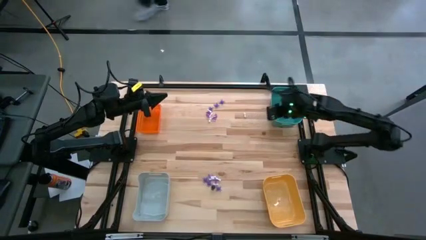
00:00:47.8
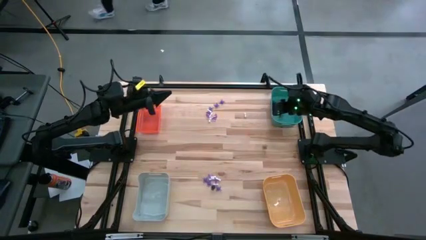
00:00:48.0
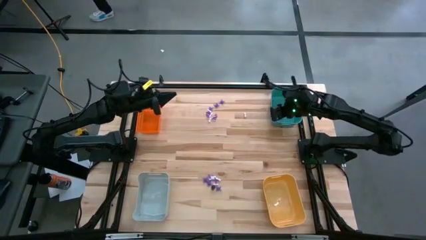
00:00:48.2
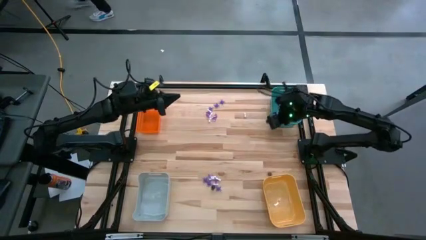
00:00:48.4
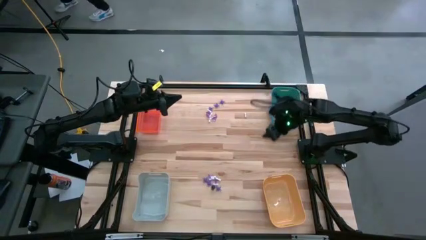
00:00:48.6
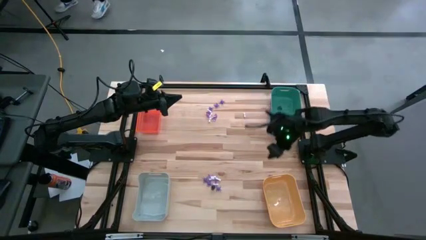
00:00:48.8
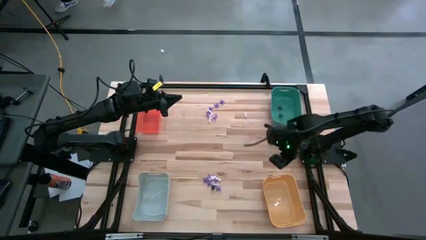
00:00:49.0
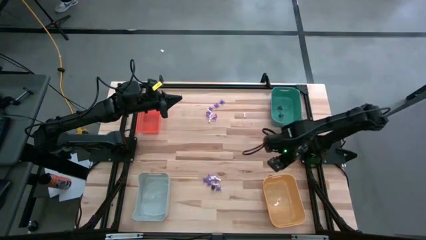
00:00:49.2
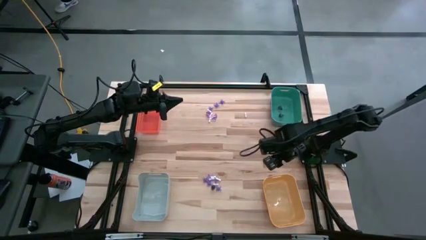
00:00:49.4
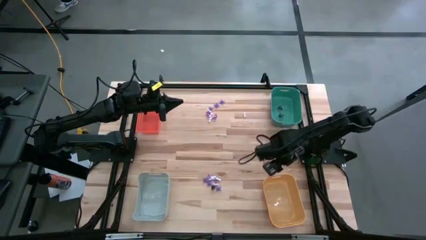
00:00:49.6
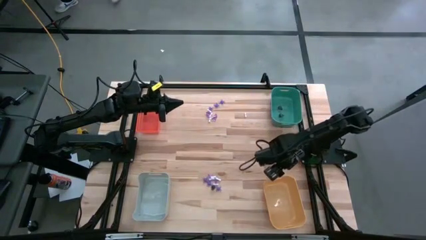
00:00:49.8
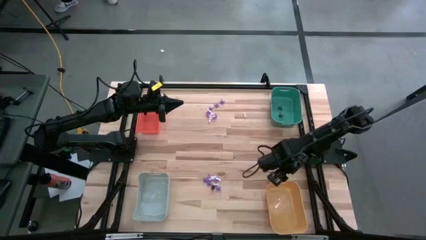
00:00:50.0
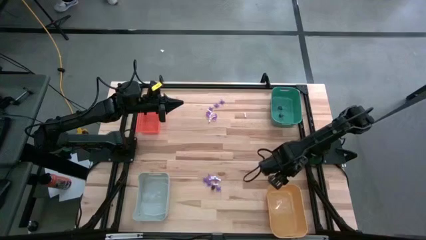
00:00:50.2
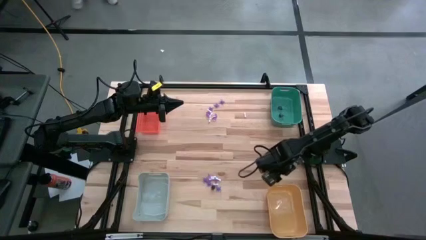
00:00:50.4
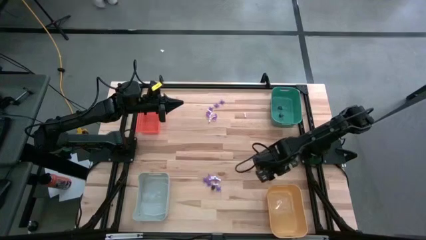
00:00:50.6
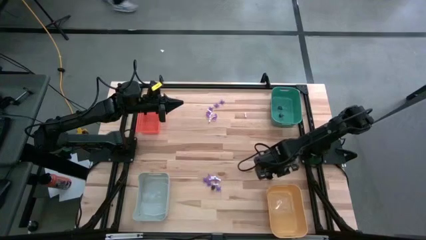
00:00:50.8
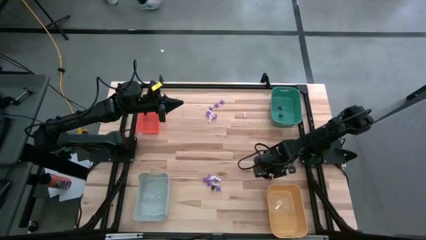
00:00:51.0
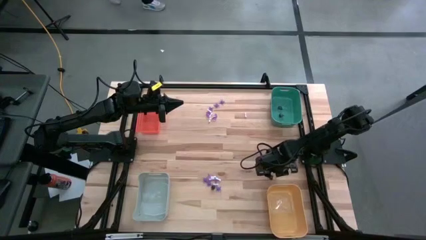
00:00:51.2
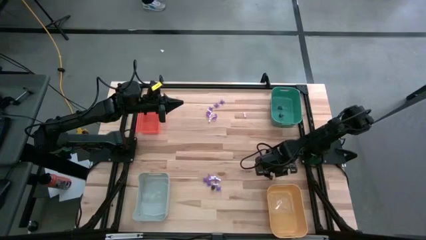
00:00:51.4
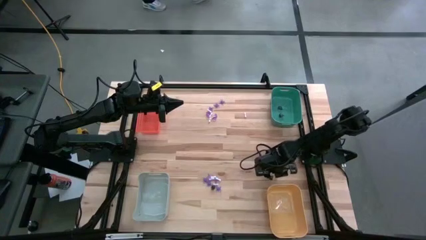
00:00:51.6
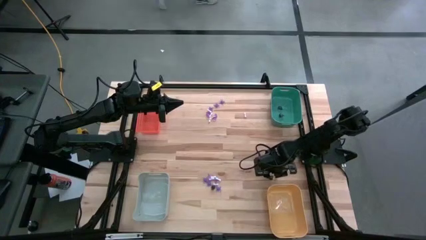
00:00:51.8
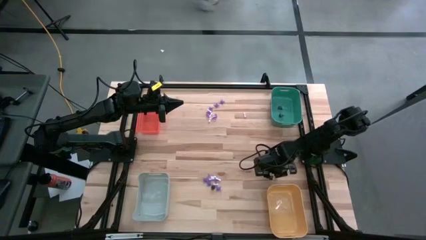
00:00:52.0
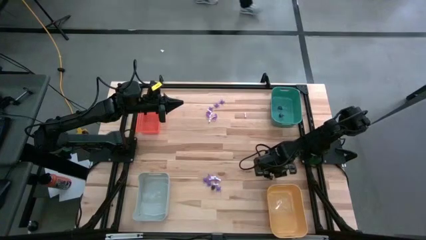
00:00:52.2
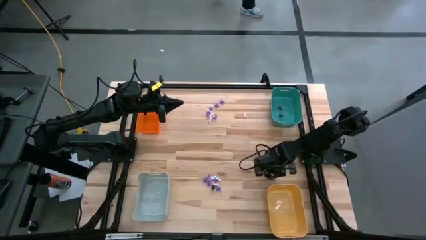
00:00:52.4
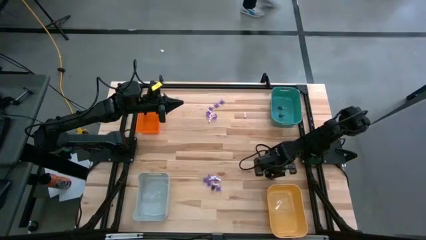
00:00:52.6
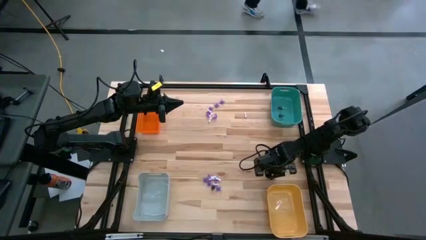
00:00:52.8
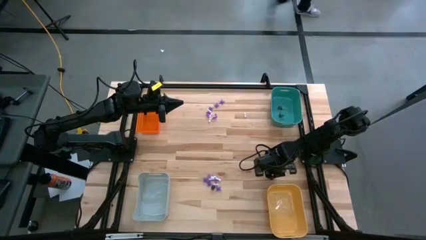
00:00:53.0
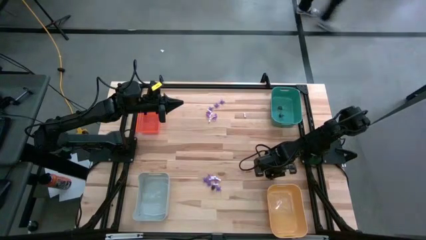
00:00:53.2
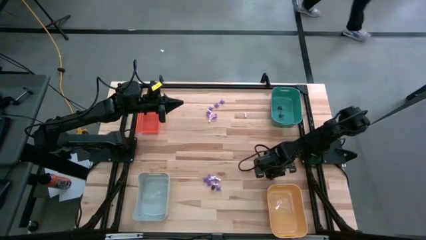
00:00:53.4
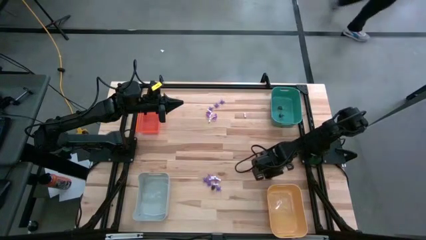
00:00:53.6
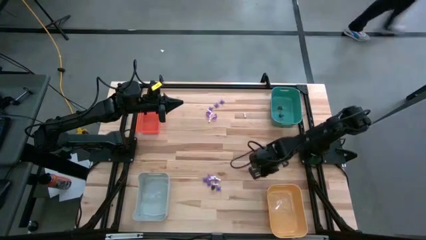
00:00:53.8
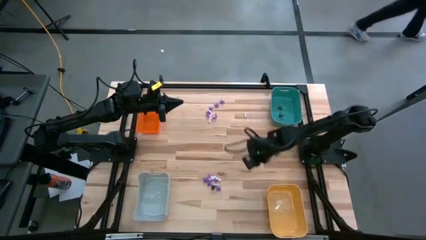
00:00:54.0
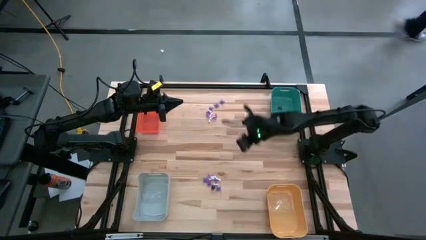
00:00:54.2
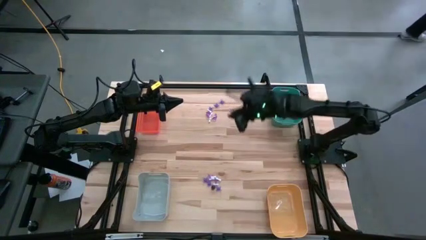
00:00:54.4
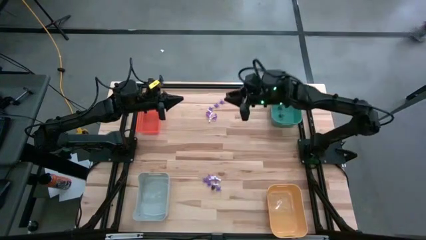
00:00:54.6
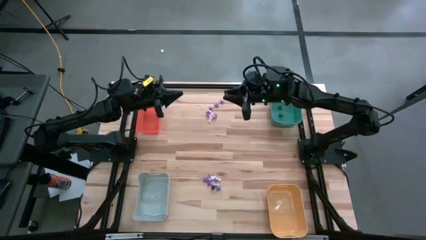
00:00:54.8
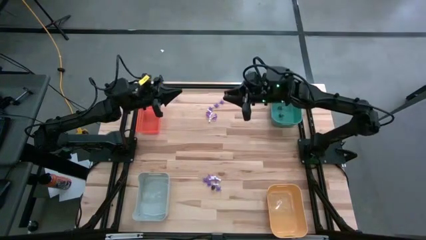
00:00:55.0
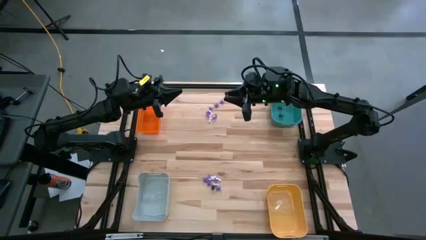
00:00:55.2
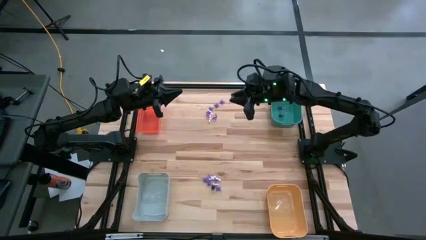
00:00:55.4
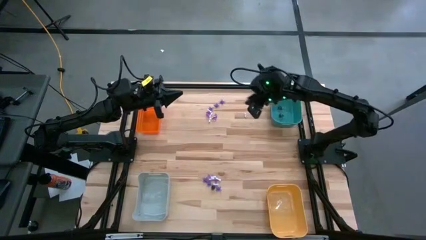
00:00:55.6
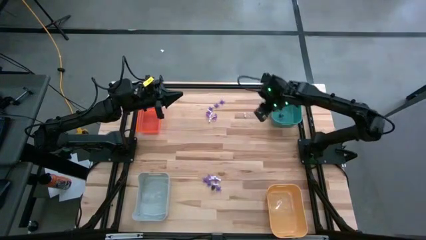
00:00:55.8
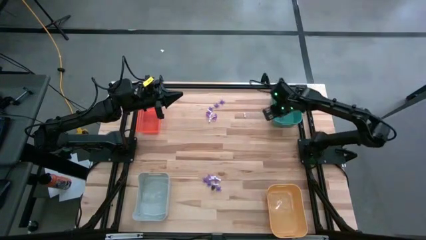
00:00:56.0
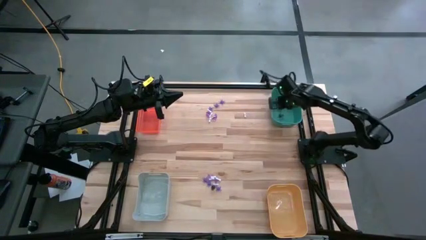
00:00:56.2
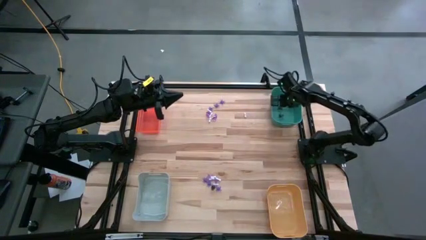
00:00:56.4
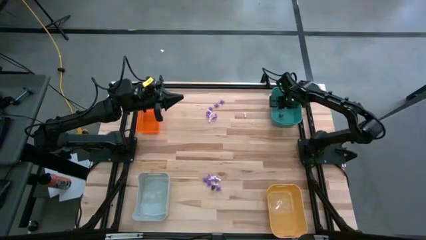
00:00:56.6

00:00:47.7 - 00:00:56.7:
Task: Sort Halloween decoration
Put the black skull toy into the green bin

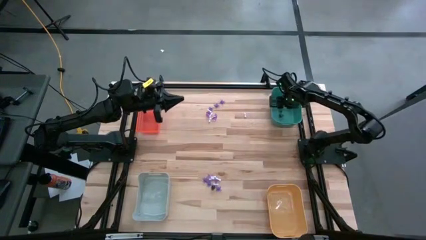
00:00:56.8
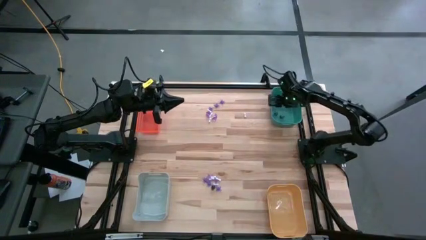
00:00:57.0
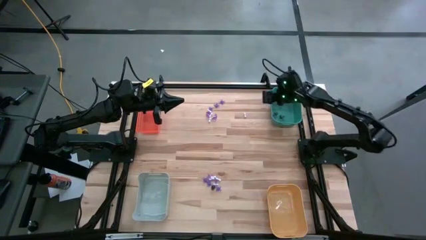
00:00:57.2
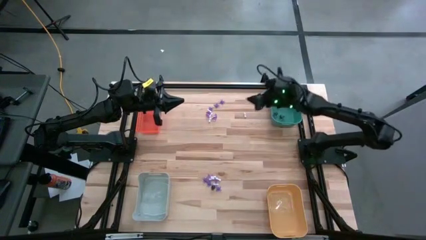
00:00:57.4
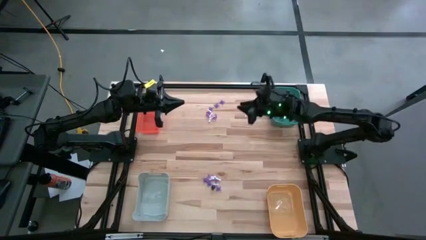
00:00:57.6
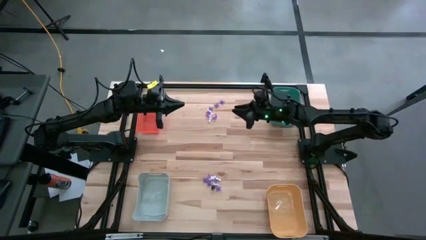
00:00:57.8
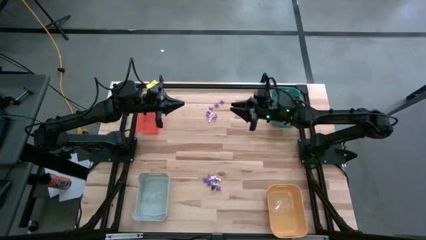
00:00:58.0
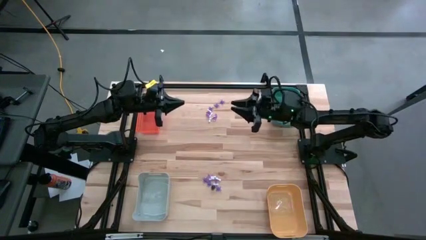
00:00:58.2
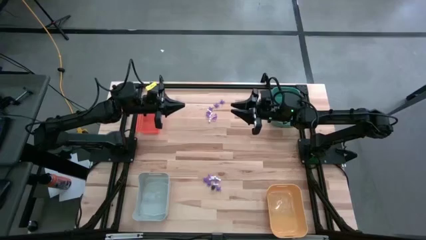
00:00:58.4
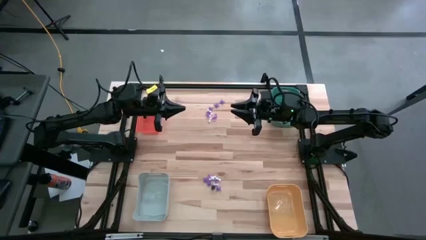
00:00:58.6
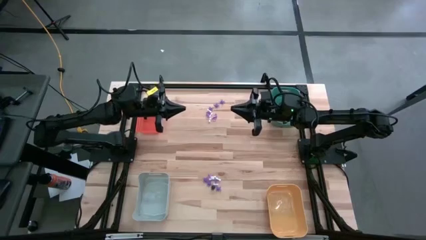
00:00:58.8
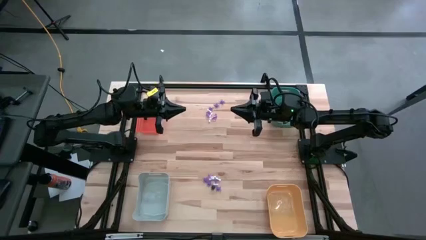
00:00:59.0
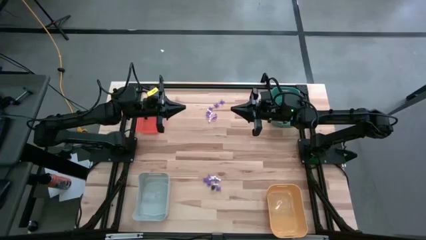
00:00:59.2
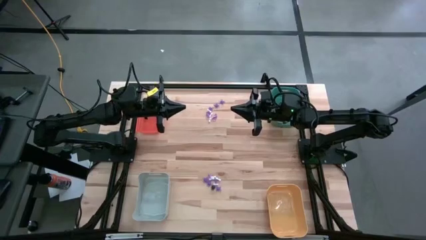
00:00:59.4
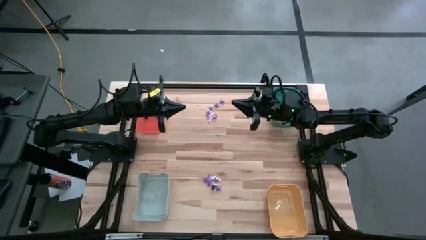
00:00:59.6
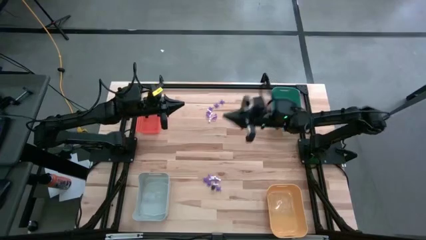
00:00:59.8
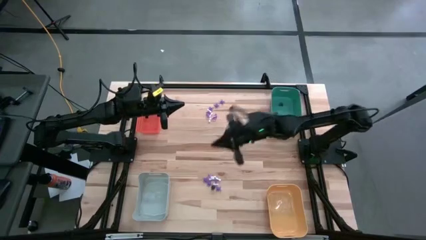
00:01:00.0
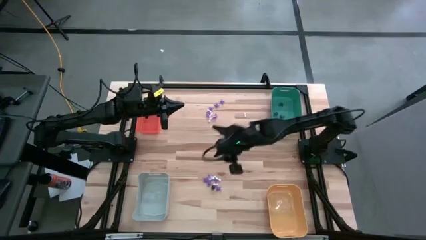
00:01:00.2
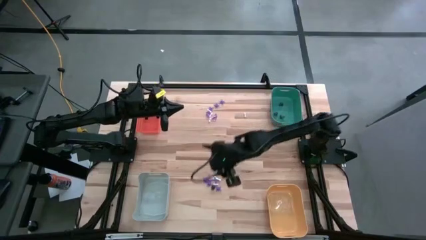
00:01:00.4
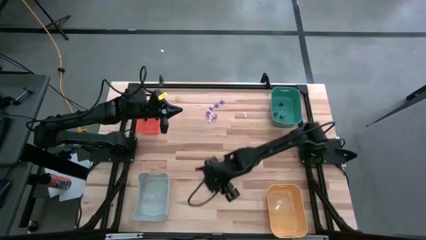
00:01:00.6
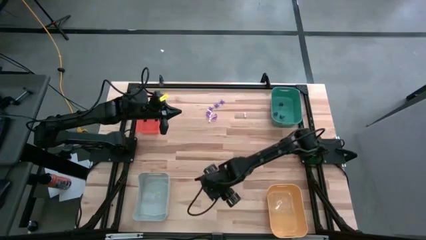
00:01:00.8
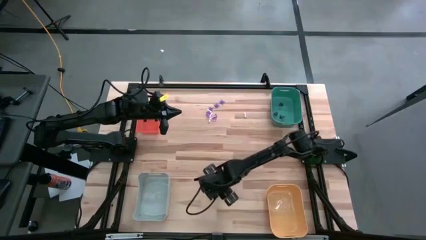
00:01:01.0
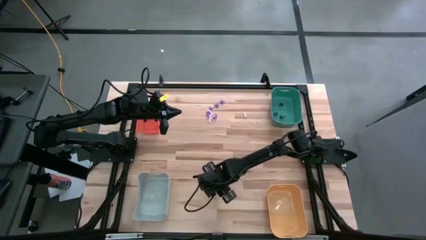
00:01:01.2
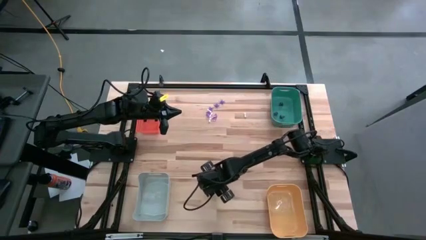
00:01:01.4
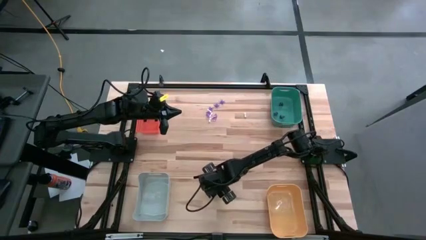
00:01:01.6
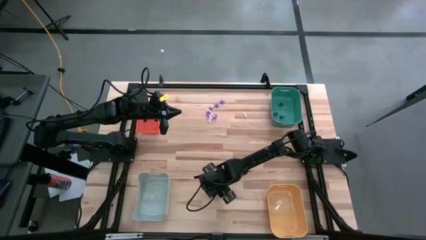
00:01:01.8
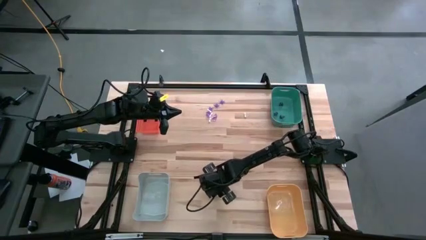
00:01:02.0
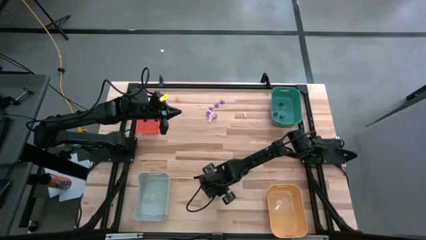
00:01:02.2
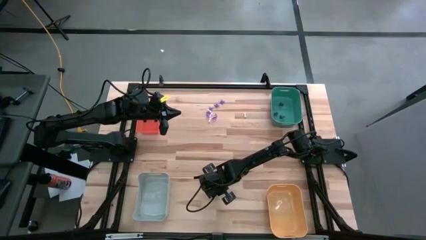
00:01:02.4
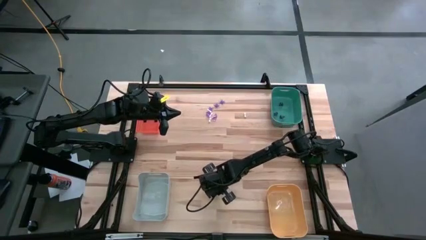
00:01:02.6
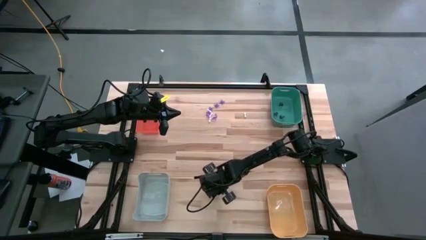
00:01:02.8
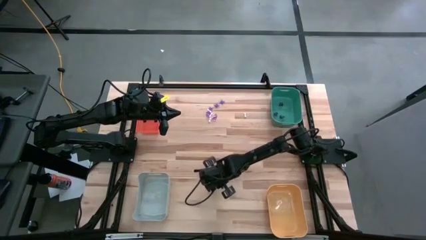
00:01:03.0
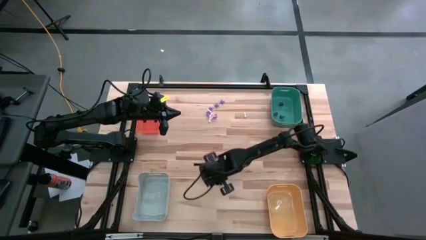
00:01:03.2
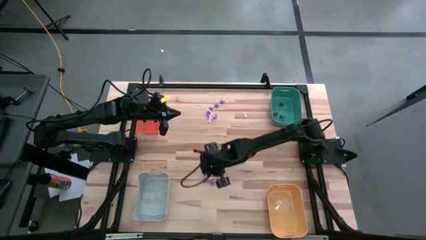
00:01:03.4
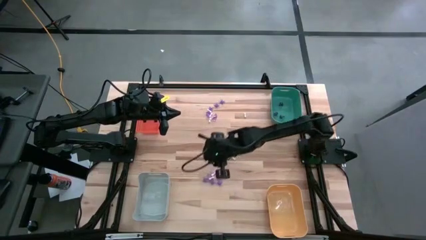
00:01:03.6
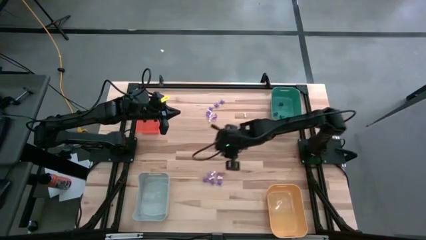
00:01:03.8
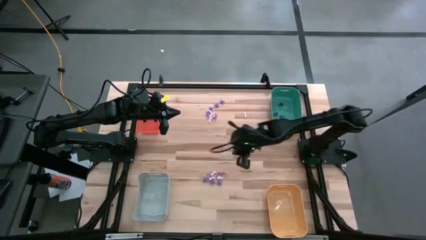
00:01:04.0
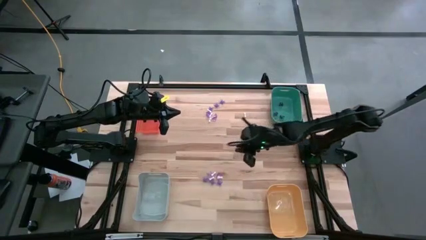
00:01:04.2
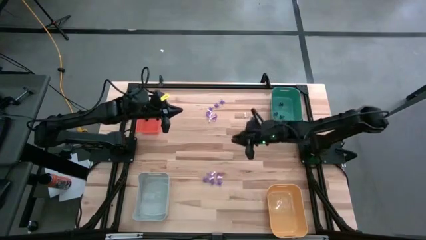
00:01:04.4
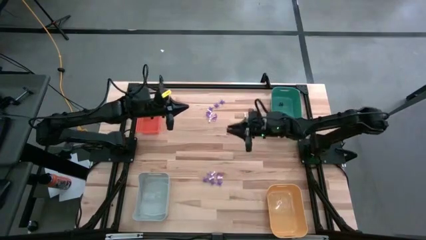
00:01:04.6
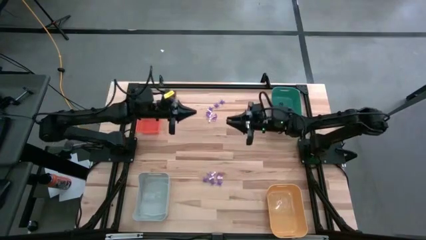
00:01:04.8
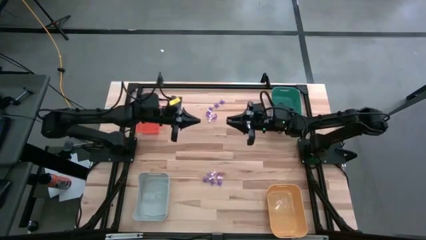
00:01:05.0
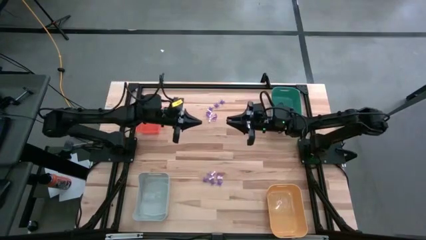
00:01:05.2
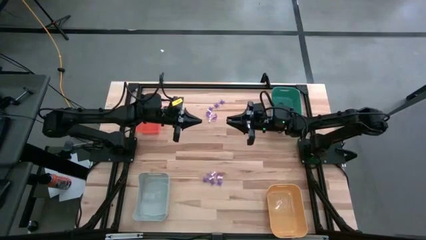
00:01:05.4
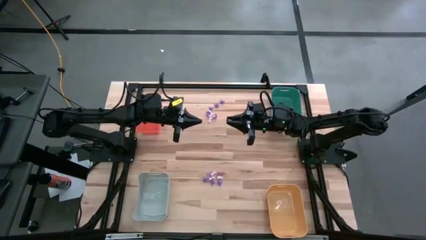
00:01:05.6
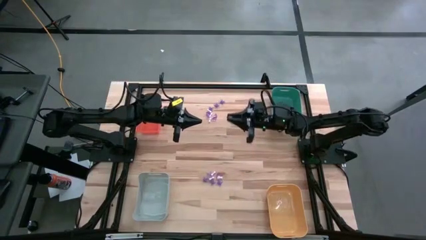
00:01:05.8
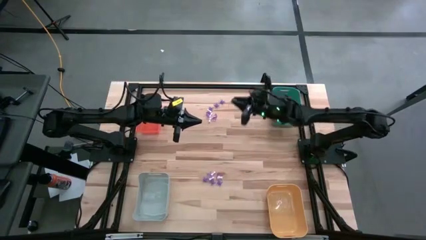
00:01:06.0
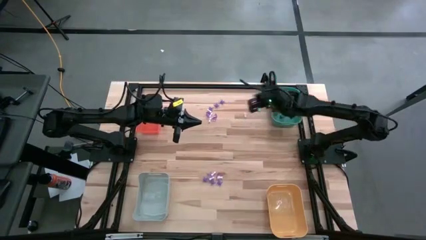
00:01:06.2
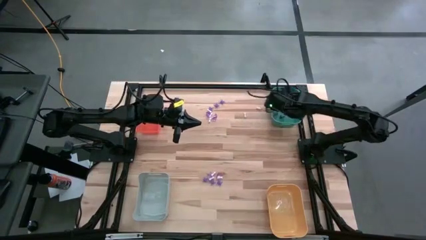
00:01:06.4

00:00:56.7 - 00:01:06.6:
Put the black skull toy into the green bin
